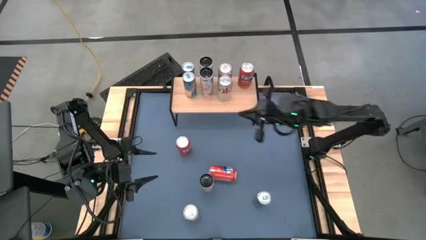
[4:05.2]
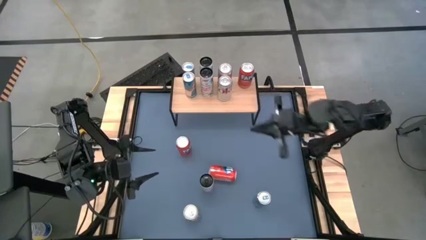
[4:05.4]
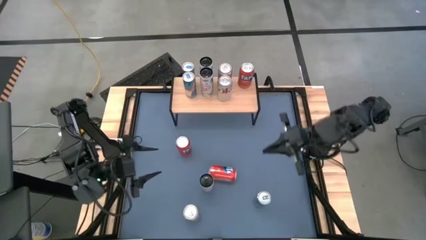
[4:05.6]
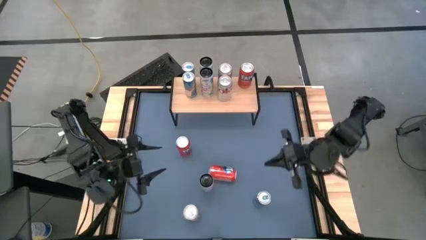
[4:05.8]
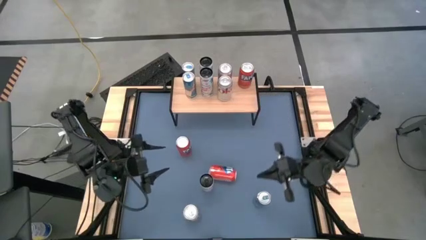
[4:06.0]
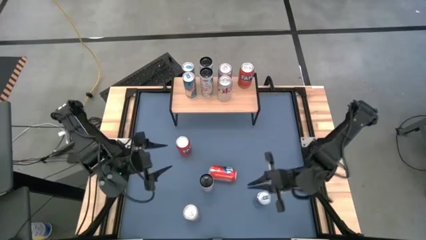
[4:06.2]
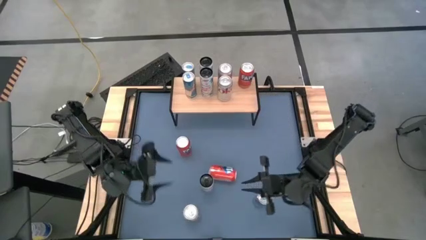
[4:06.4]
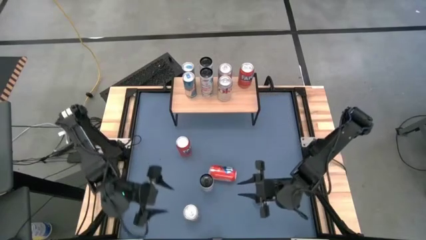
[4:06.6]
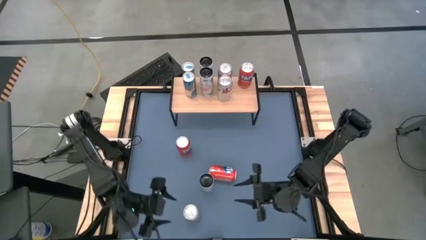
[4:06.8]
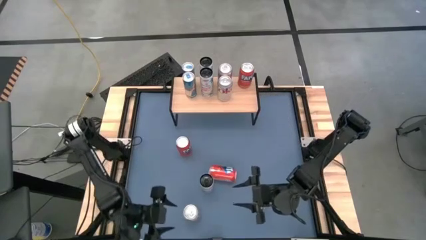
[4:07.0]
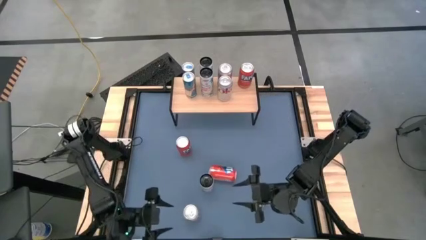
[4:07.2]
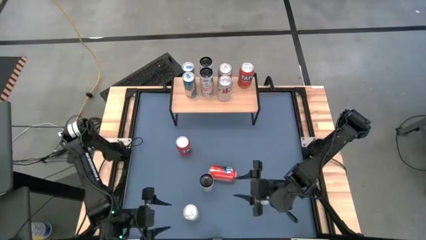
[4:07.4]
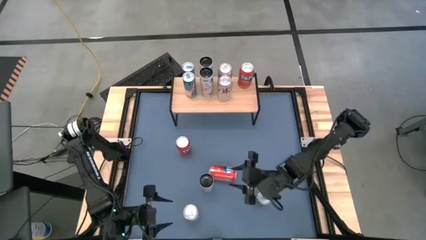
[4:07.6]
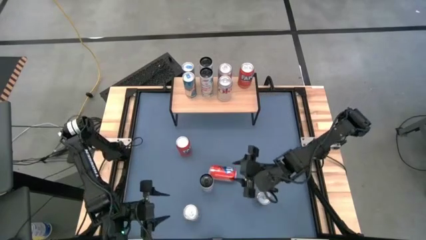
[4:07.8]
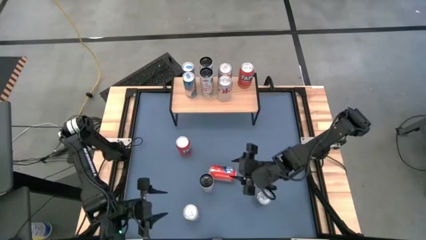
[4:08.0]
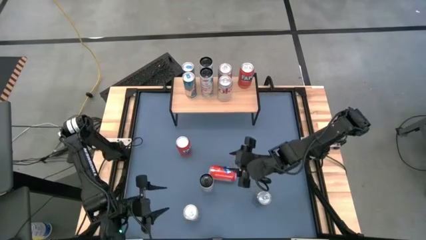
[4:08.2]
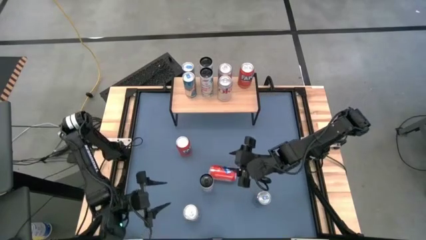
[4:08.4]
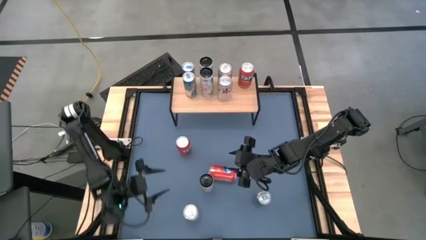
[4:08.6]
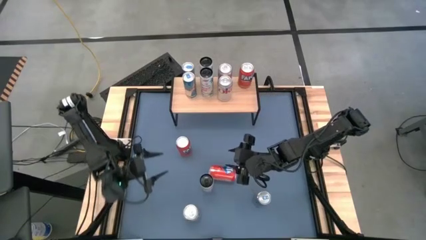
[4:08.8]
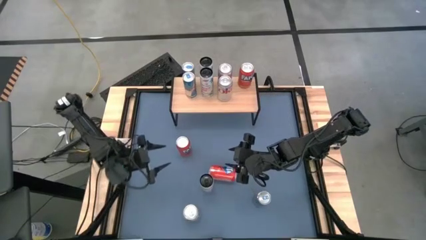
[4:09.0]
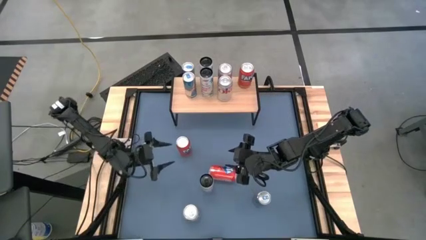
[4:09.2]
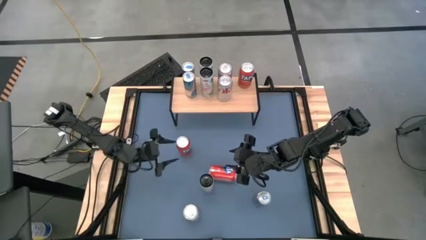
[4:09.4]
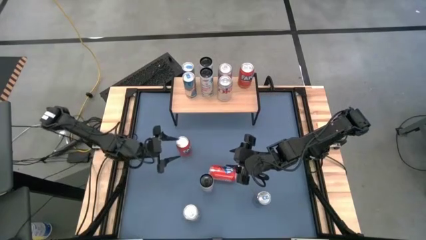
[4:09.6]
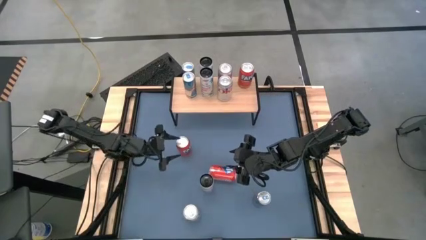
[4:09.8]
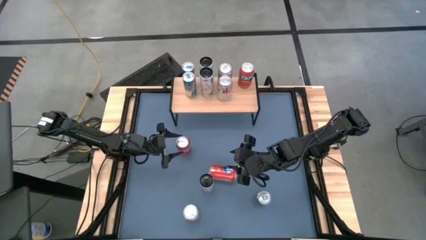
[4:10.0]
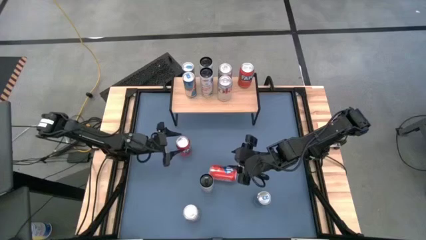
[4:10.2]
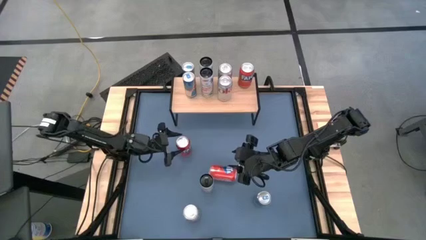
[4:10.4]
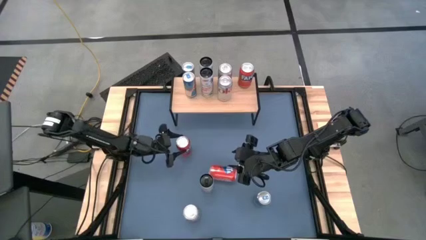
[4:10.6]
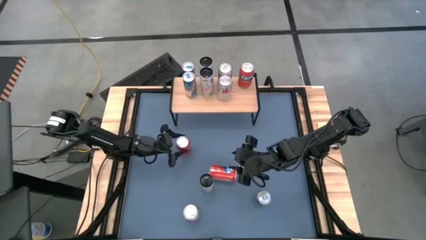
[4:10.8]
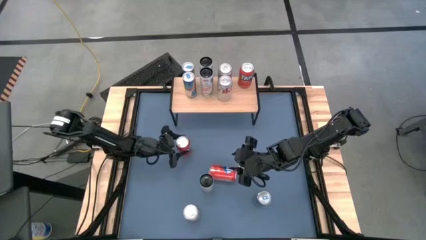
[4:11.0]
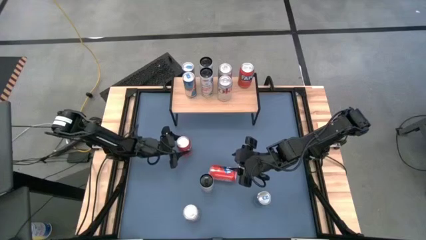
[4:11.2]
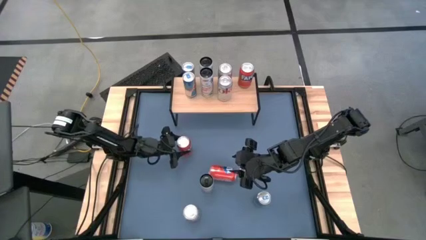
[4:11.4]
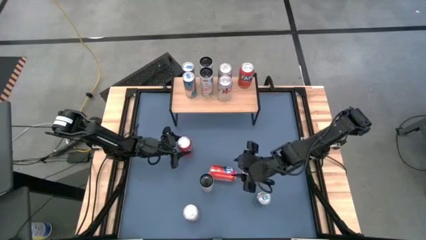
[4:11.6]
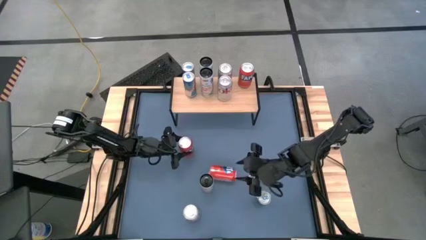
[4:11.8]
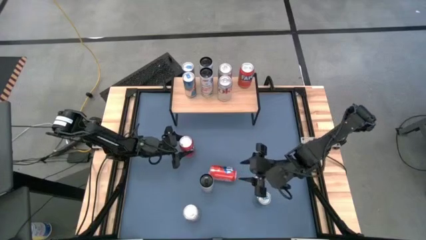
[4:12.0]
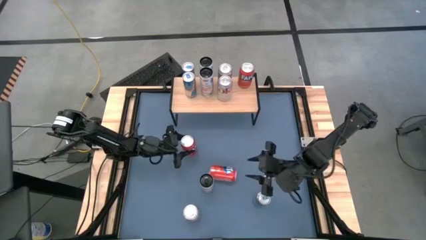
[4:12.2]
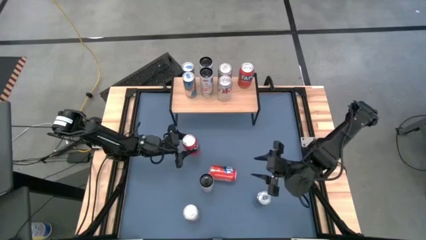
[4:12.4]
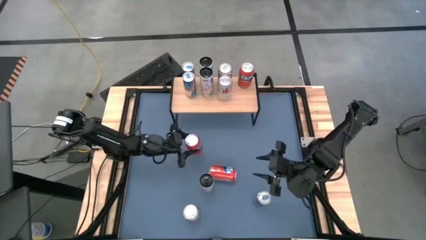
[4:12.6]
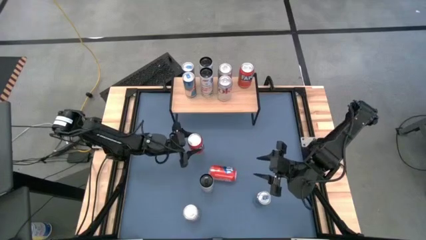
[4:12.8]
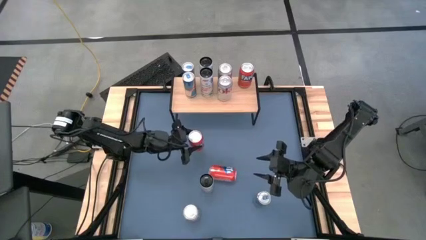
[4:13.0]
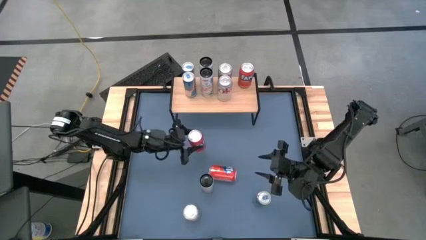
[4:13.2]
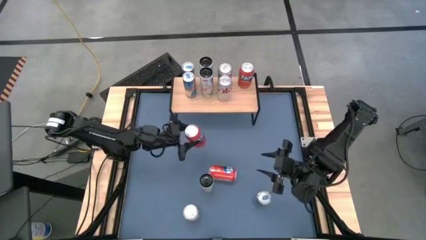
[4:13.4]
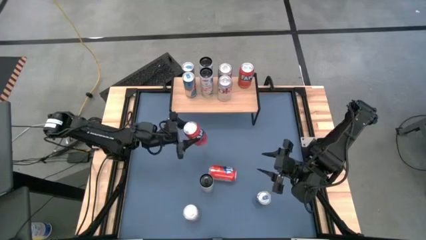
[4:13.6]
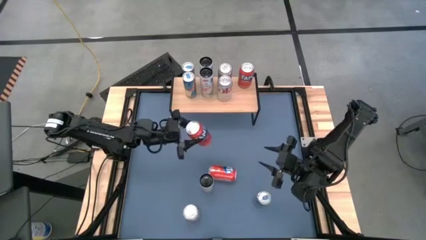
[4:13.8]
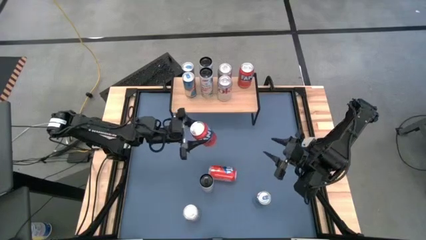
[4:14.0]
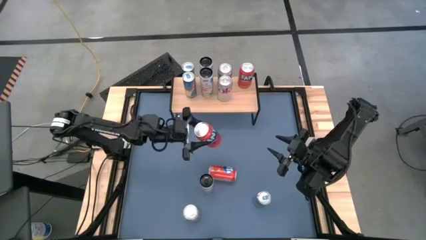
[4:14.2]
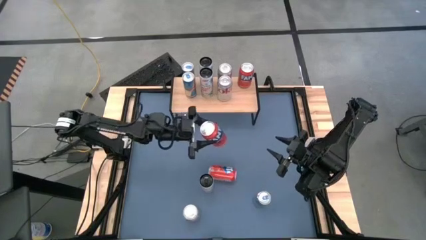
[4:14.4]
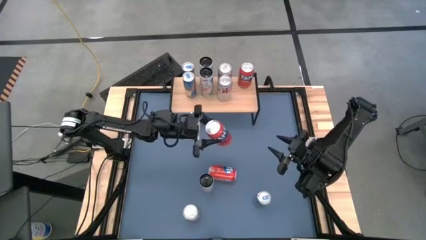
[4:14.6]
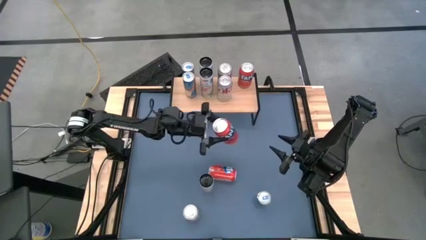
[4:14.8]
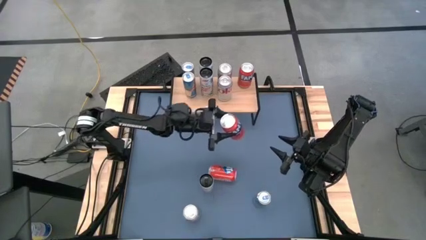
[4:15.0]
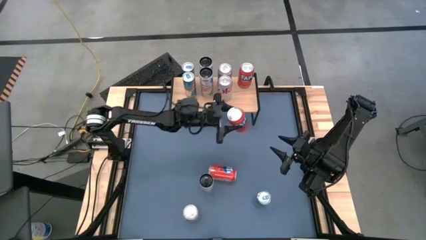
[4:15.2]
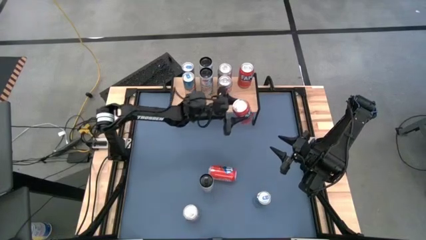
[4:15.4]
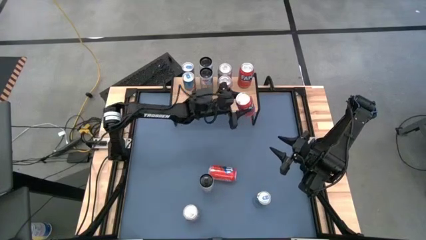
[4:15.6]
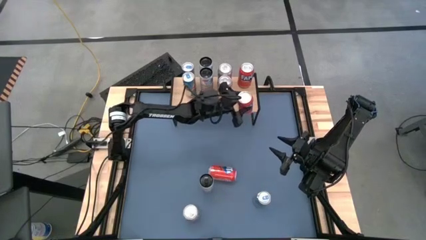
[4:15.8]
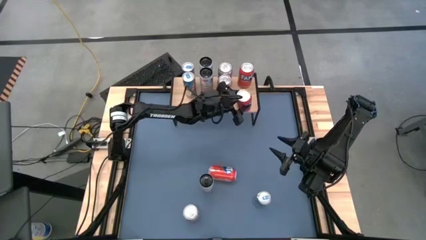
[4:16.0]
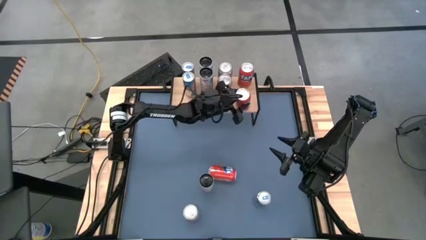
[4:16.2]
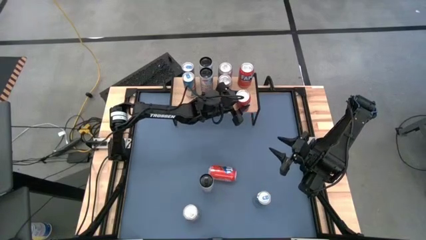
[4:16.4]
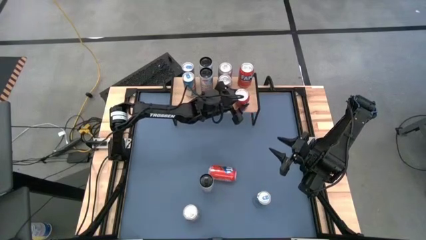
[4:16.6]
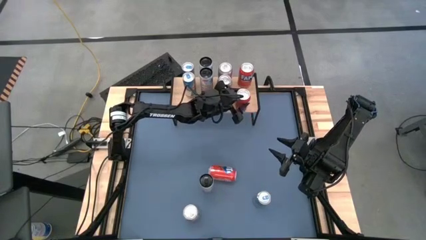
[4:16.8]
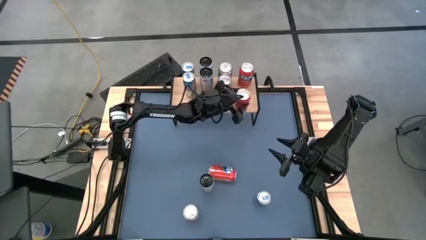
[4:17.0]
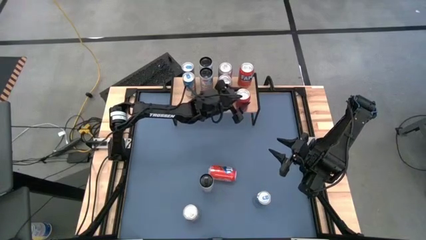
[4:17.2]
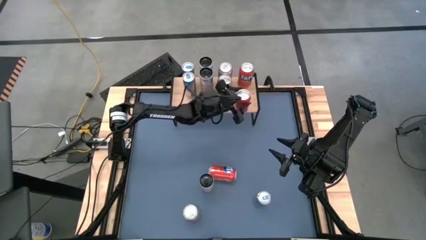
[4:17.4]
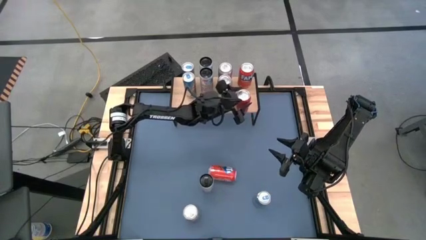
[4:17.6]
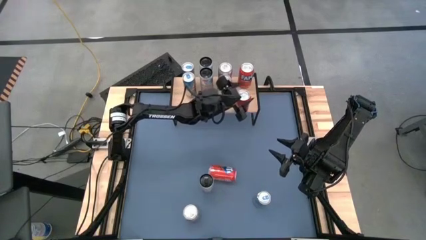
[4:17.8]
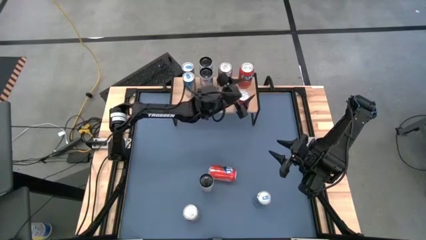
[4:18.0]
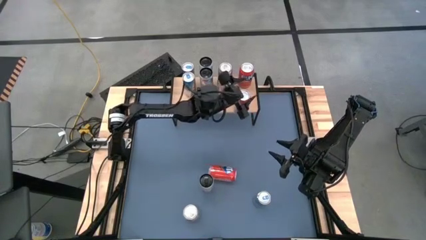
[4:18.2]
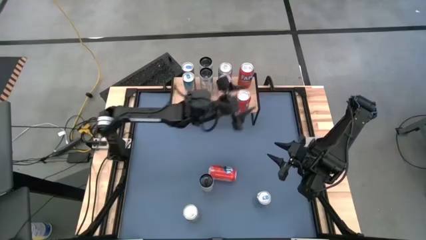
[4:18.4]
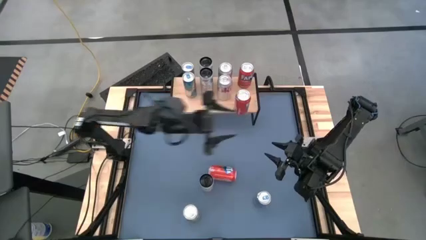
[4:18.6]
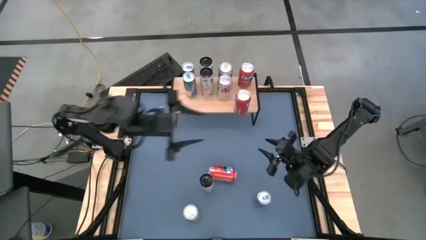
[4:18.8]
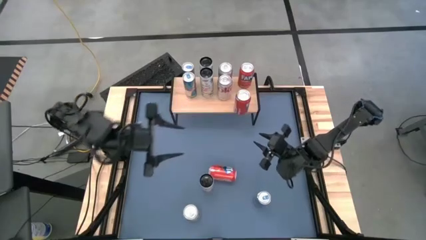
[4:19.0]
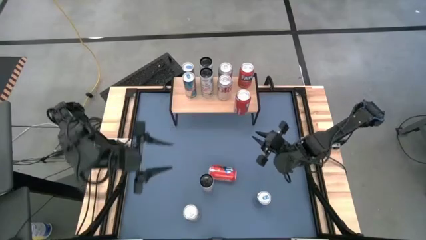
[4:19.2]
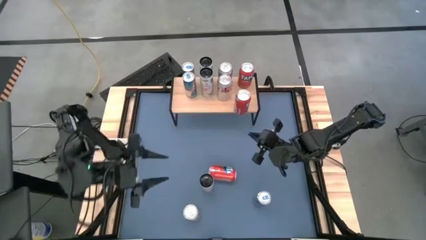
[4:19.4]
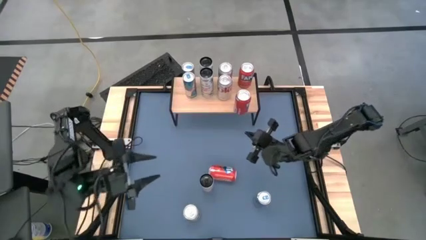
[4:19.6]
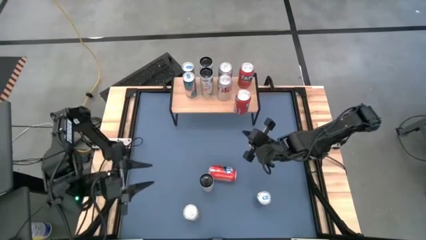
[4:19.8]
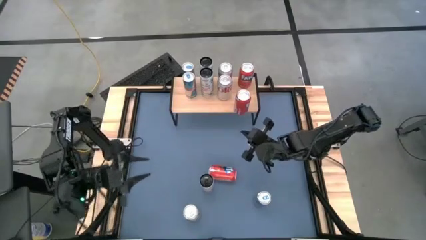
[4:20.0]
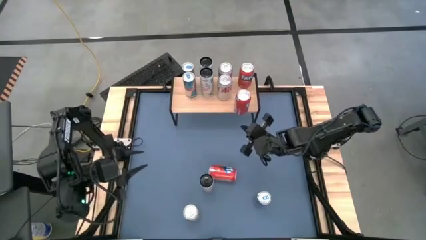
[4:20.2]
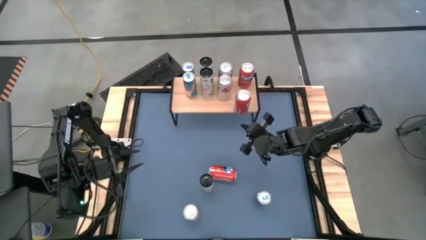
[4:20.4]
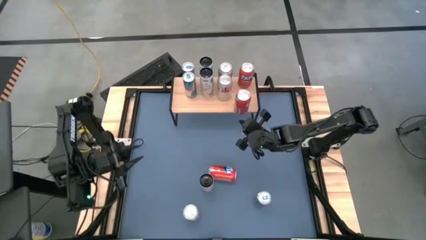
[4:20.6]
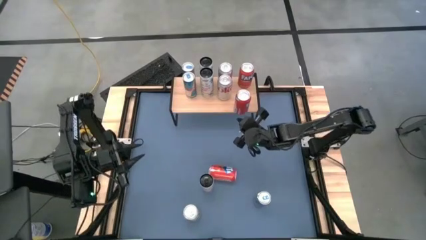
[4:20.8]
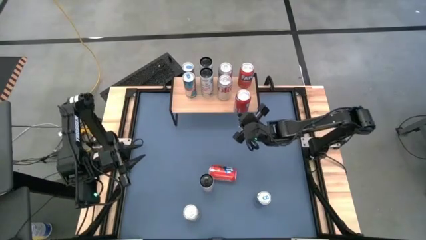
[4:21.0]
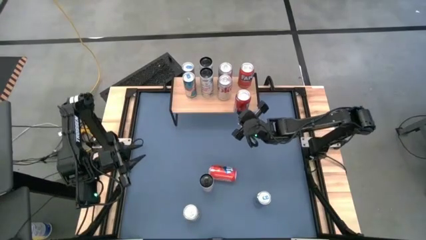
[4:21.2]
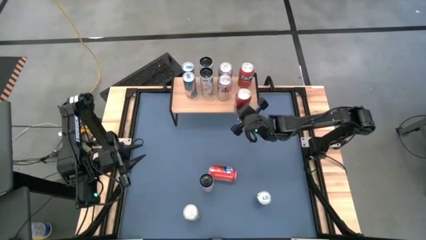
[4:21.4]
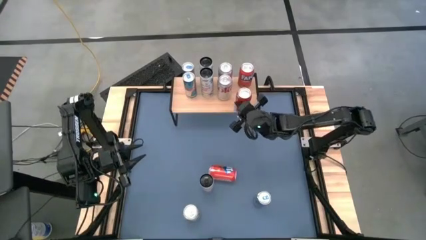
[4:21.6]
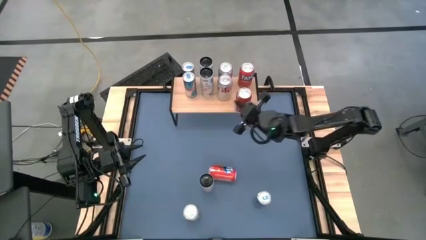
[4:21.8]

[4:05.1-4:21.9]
Task: Place canned beverage on shelf
Put the top left orange soda can on the shelf aligned with the other orange soda can
